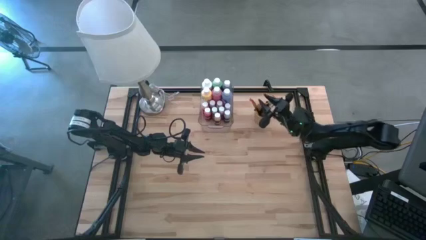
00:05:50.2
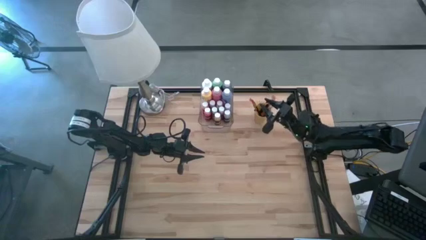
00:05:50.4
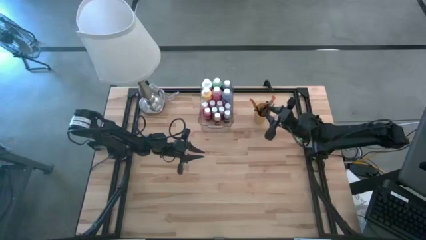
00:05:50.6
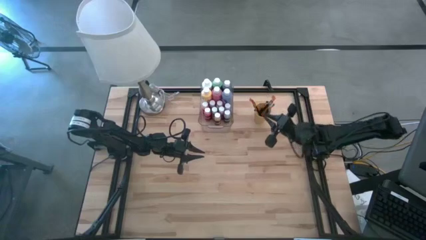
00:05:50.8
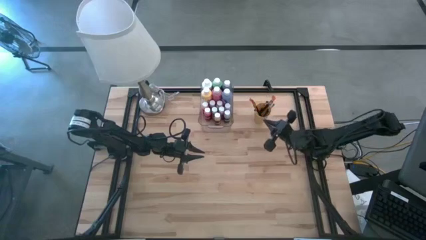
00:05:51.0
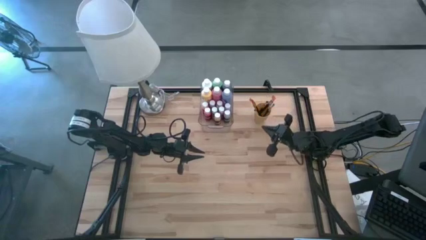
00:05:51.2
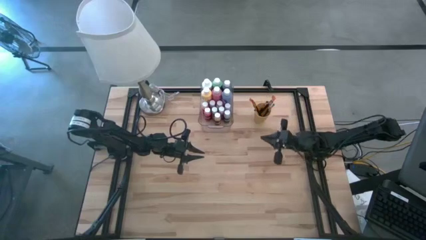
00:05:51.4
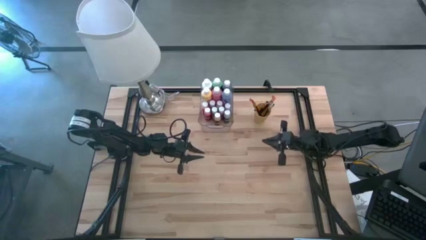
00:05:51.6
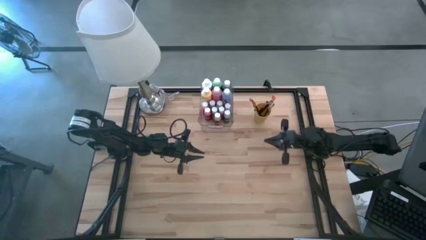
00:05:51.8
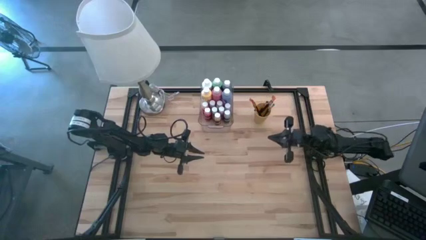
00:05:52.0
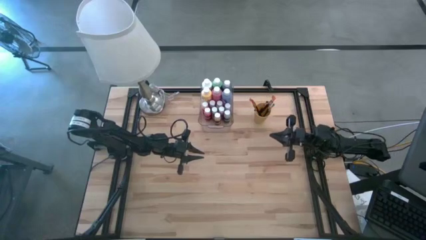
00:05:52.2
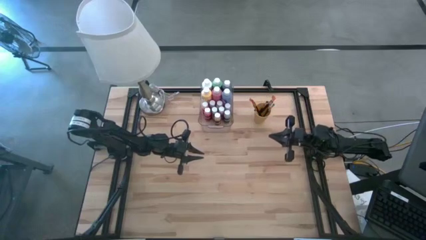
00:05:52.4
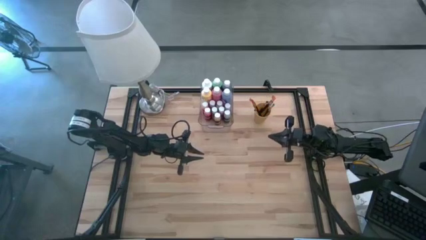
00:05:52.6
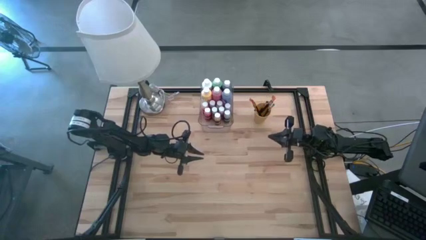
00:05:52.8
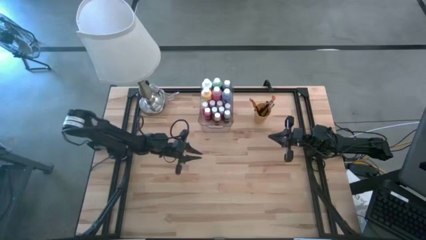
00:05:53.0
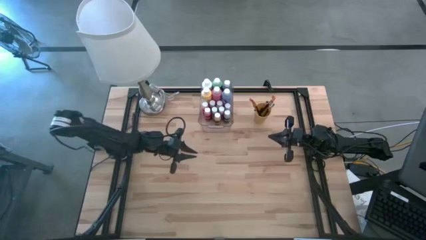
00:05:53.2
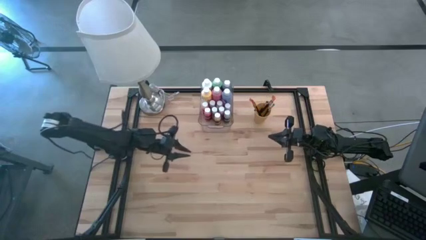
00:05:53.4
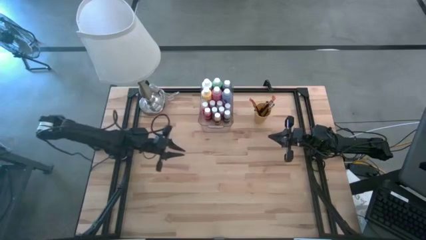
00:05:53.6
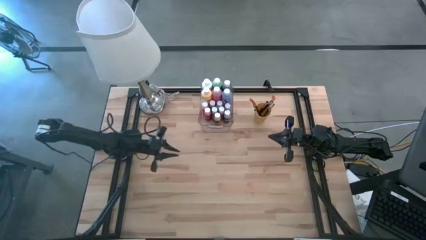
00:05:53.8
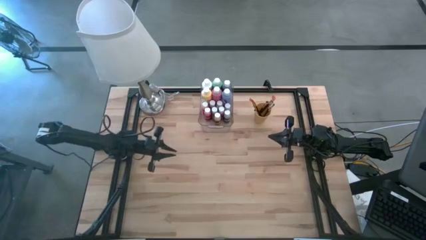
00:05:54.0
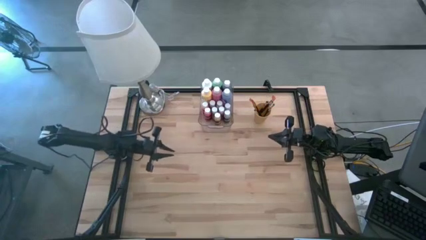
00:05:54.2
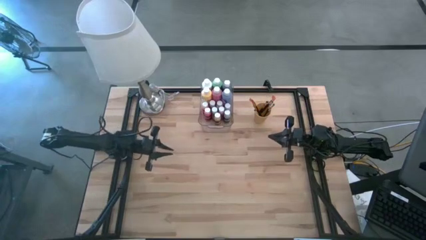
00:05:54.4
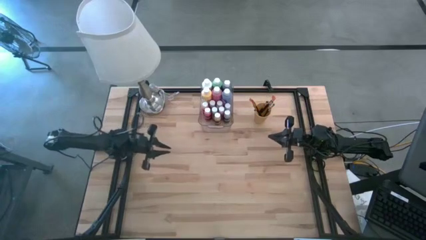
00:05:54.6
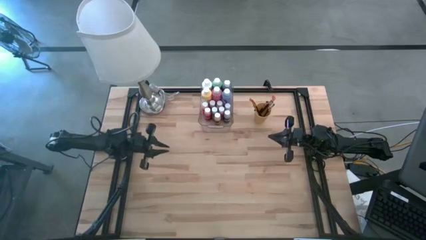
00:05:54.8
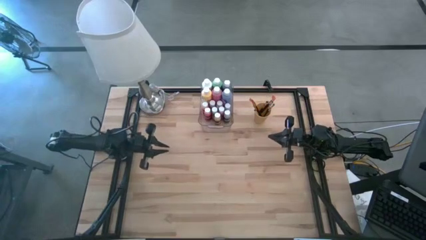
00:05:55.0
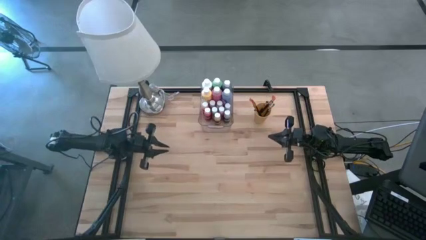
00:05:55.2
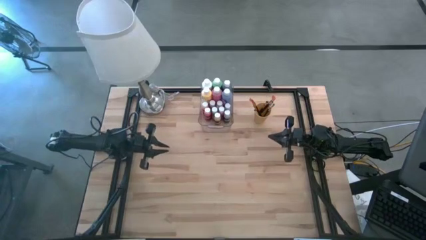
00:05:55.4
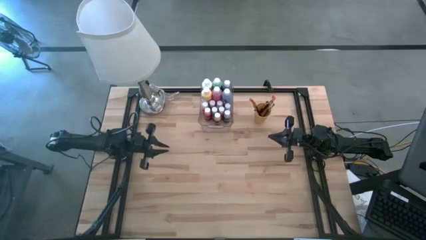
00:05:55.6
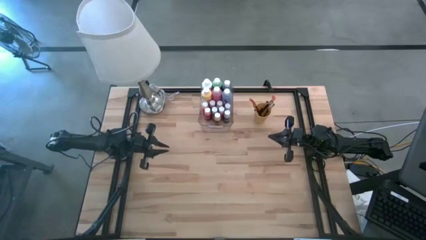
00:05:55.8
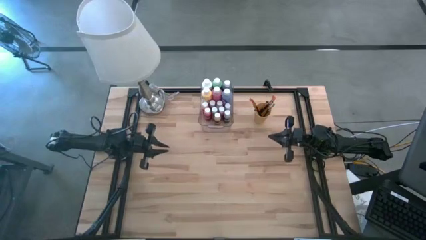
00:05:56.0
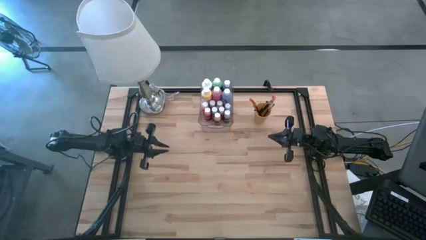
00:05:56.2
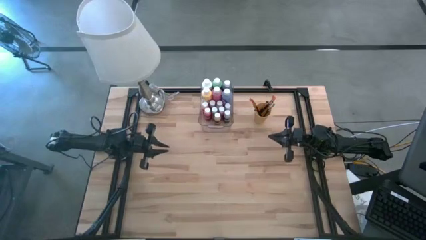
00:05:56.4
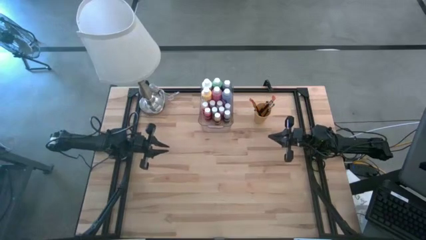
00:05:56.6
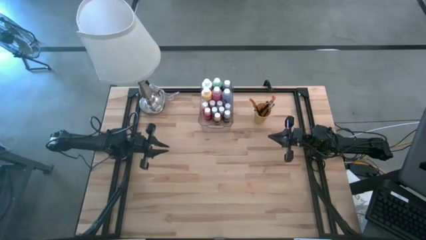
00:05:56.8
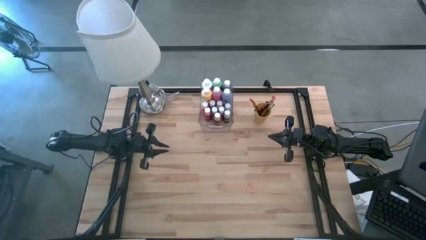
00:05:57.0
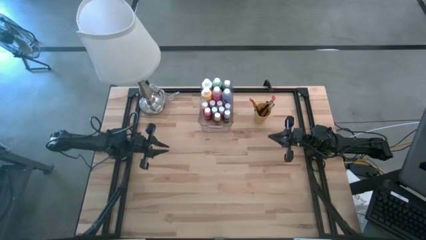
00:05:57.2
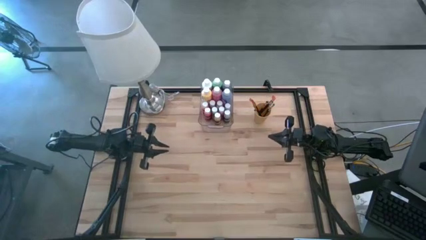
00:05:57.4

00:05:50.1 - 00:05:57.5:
Task: Pick & Place Paint Supplies
Return to Home Position

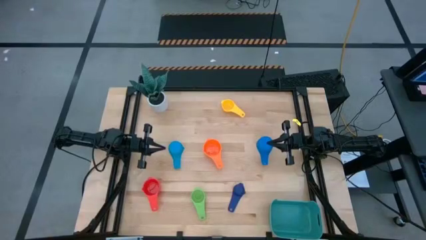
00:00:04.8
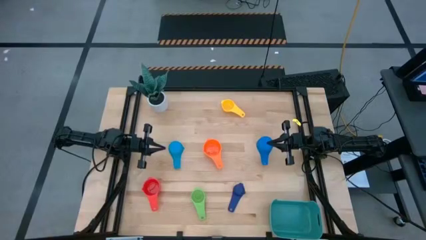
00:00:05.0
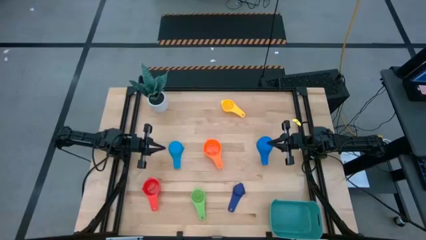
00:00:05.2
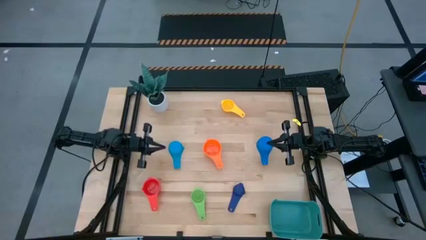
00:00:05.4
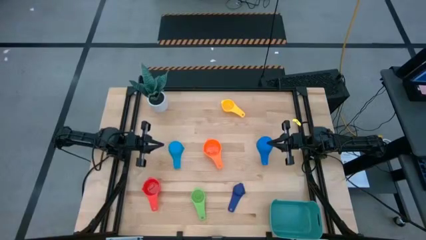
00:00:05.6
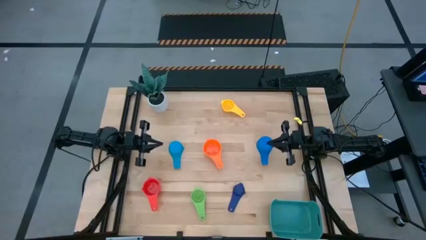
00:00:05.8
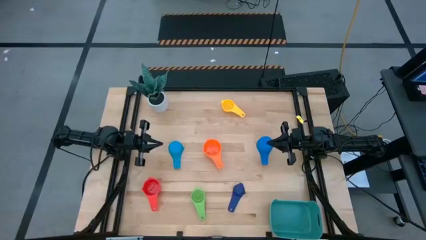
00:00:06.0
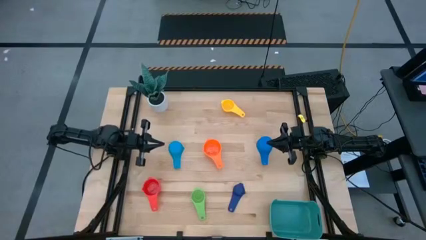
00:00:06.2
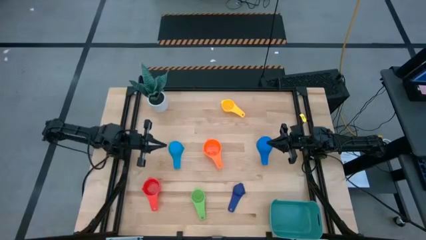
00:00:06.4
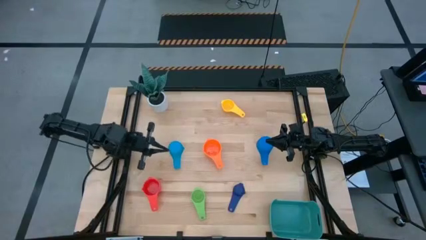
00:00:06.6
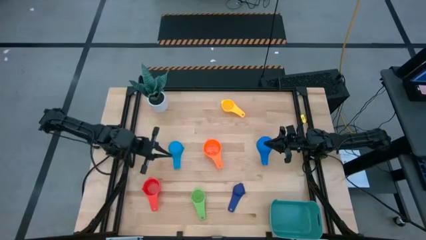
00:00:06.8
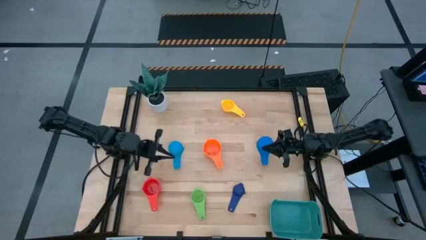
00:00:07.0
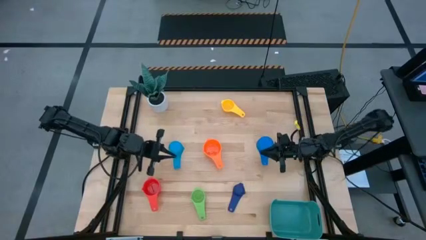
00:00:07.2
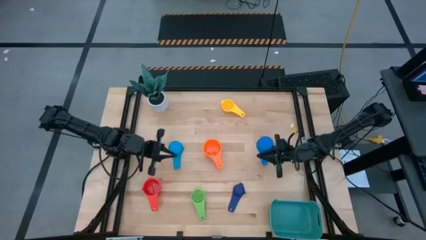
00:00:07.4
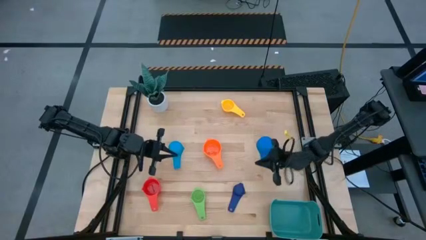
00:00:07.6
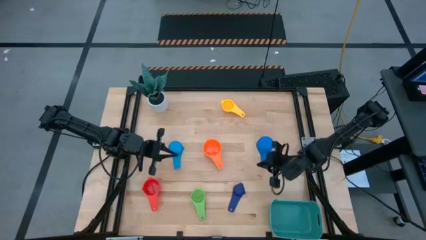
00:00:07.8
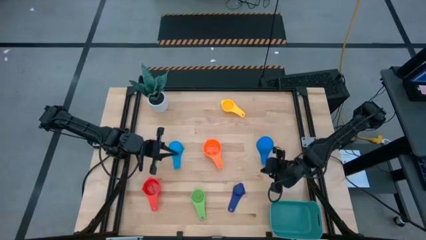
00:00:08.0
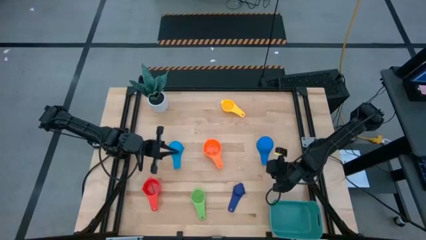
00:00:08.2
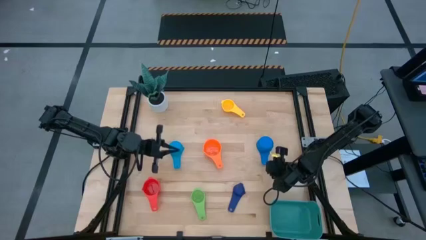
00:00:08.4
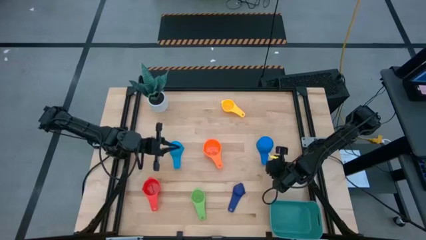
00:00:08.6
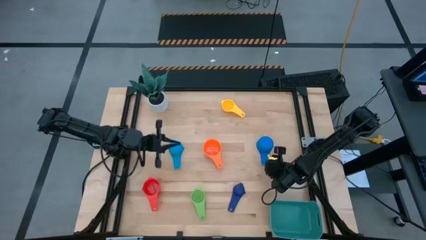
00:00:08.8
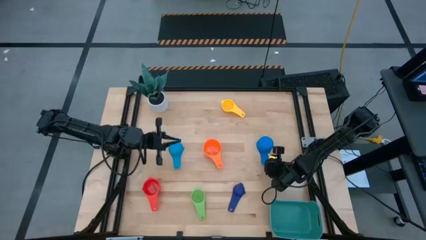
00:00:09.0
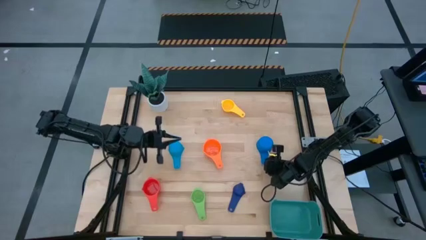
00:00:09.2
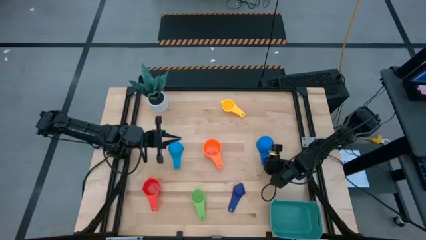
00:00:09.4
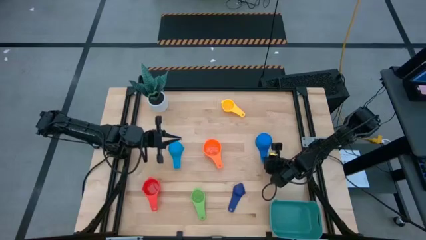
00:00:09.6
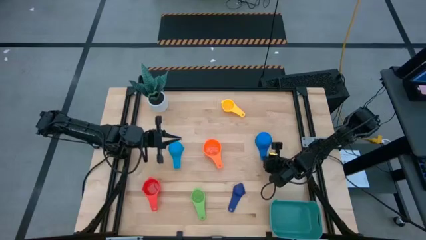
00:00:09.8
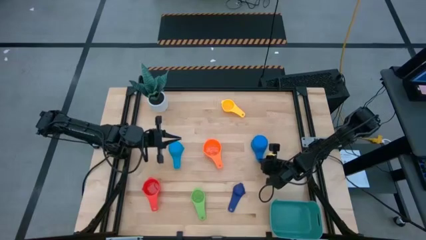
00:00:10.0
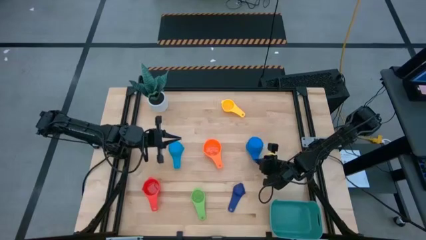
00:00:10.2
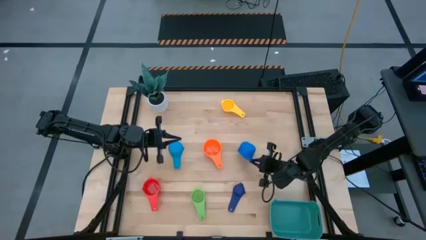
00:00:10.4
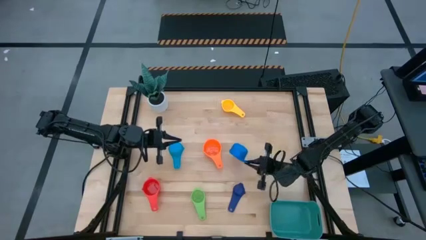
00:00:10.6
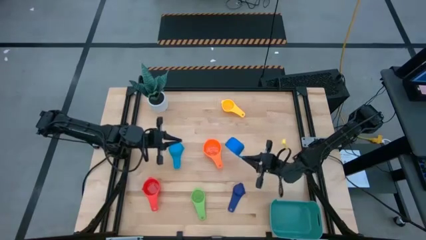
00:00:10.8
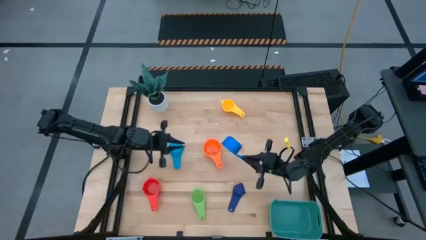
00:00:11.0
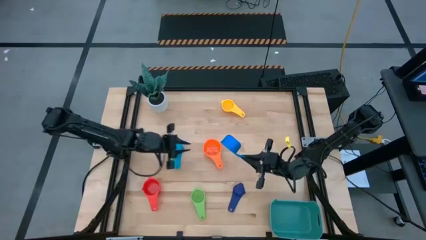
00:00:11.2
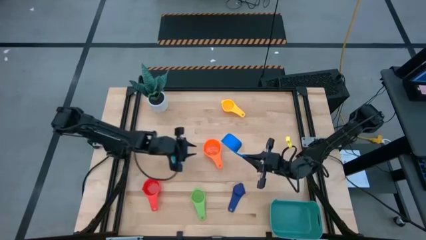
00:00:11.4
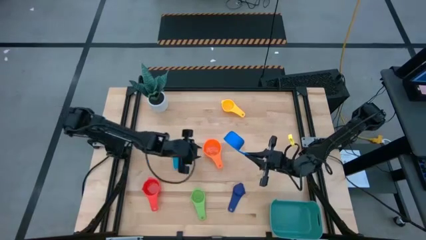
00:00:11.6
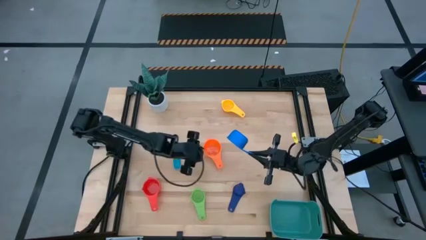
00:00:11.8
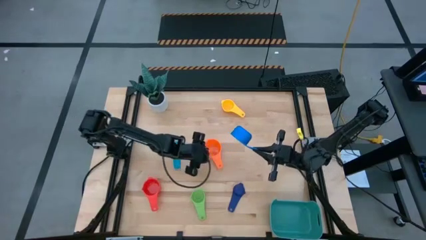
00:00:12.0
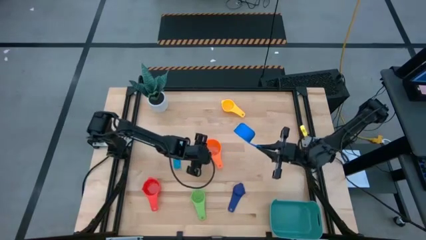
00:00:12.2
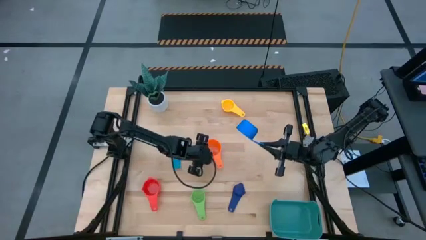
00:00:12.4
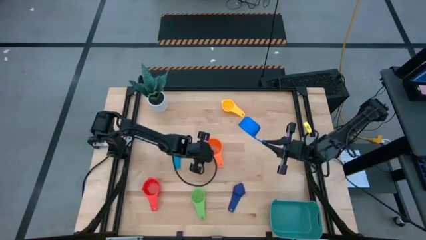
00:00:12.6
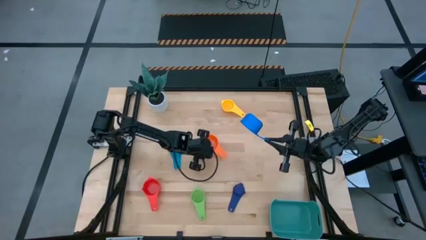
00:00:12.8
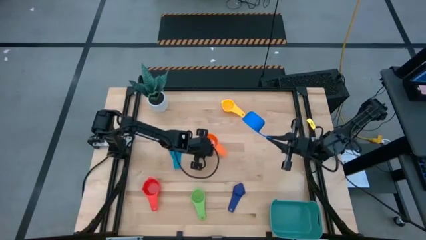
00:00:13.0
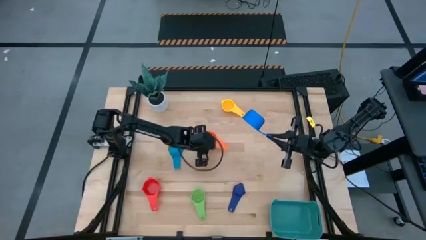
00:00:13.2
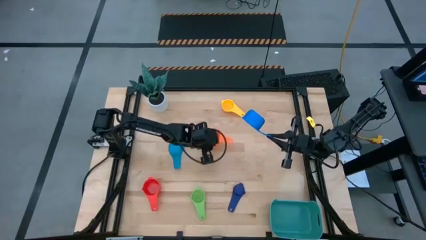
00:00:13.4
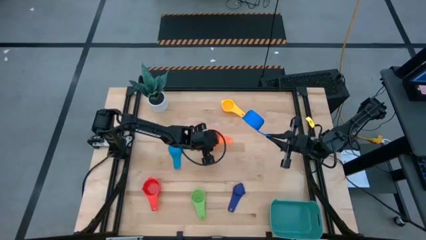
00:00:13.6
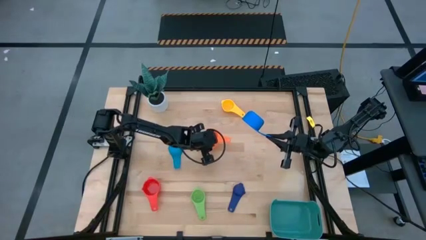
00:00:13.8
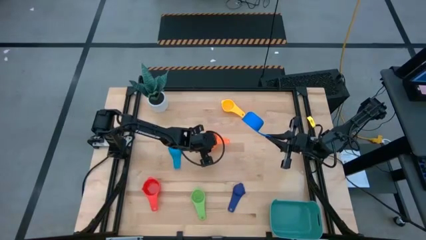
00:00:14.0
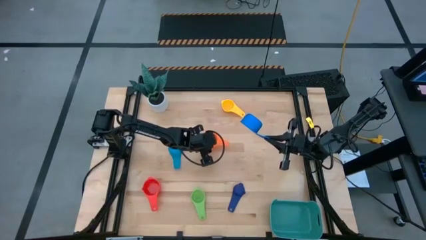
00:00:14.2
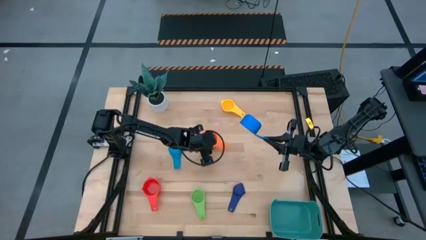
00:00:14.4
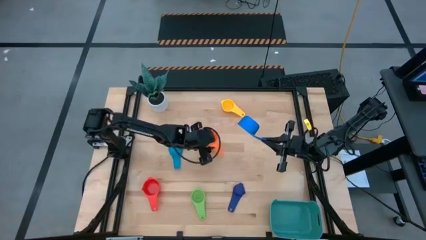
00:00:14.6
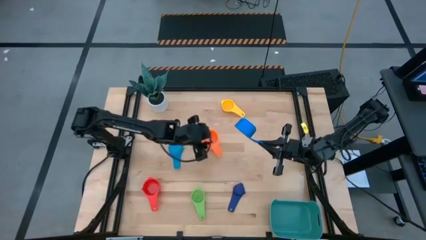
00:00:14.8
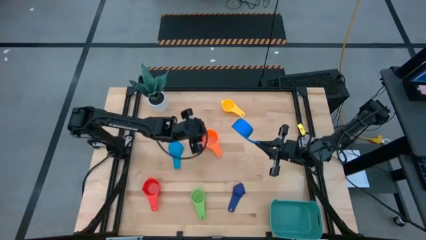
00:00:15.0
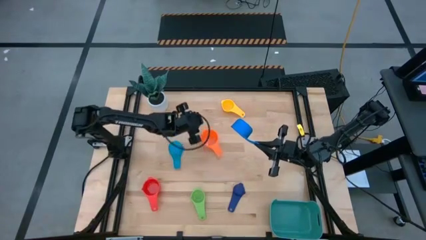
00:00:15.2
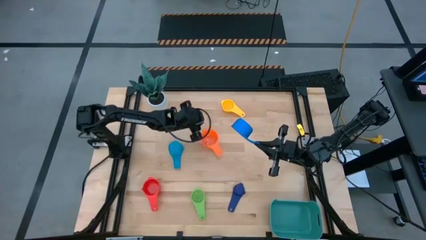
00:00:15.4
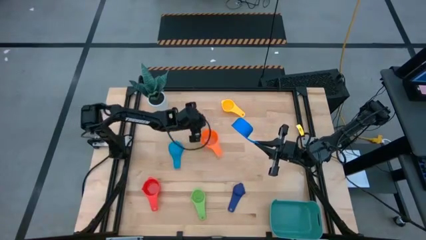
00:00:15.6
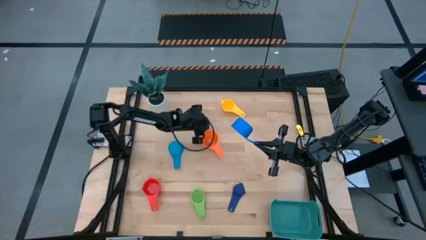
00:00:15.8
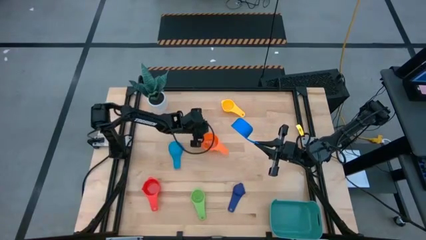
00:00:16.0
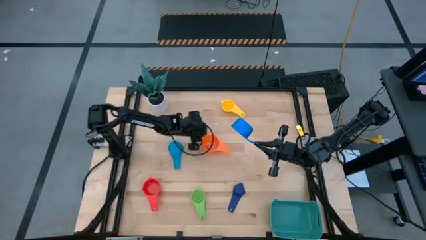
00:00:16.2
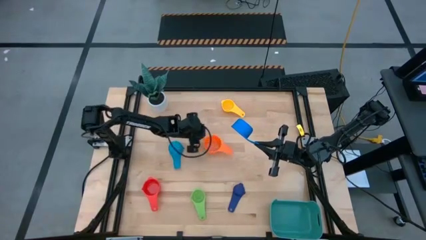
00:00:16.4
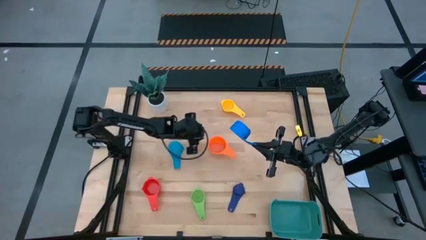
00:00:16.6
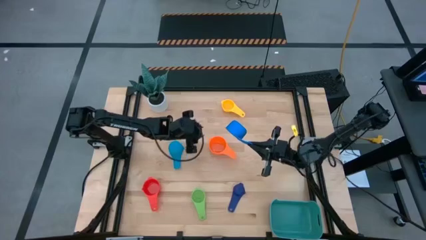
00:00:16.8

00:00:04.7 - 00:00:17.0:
Task: Nest measuring cups in basket
Stack the blue measuring cup on top of the orange measuring cup
